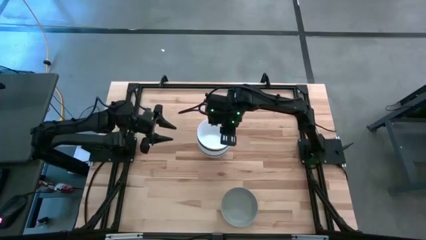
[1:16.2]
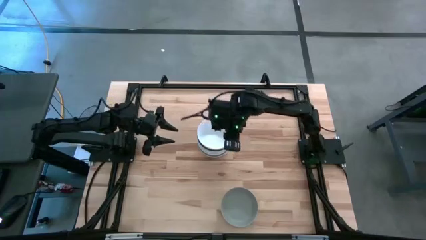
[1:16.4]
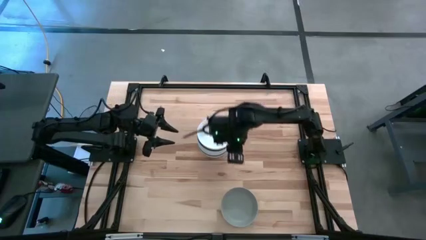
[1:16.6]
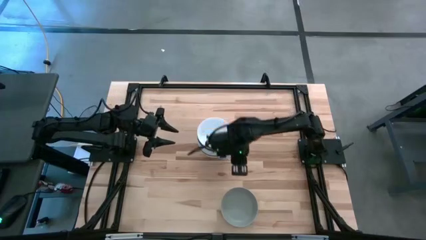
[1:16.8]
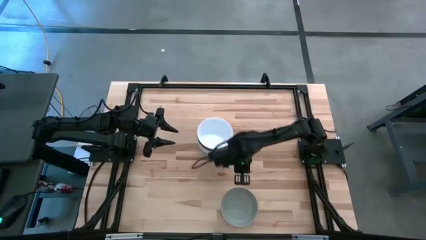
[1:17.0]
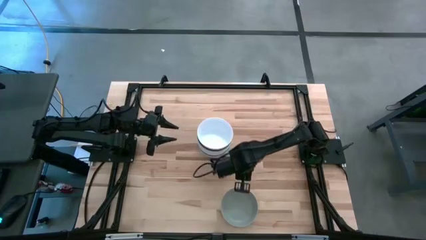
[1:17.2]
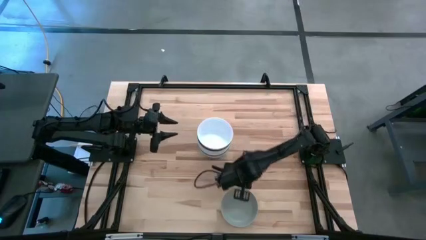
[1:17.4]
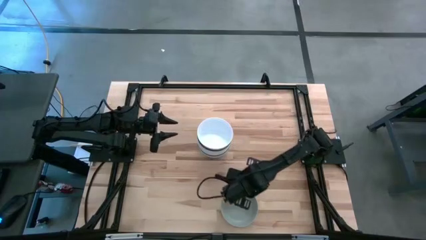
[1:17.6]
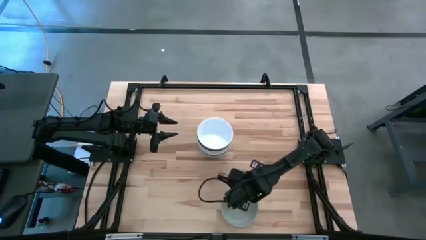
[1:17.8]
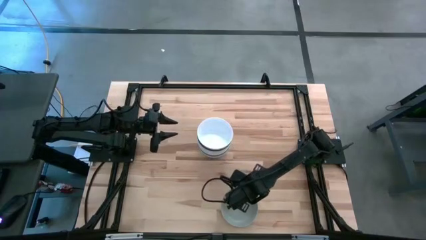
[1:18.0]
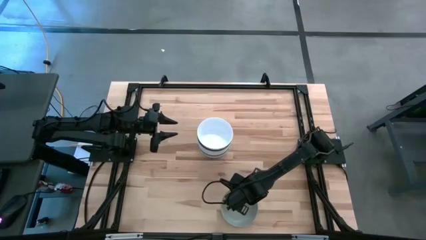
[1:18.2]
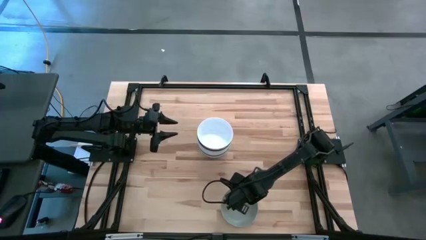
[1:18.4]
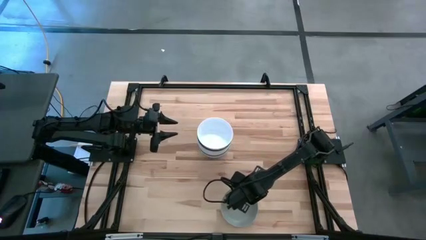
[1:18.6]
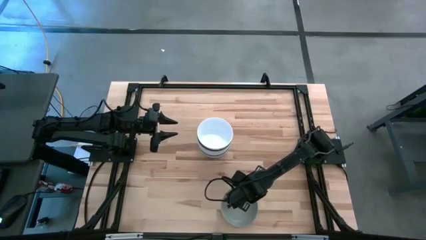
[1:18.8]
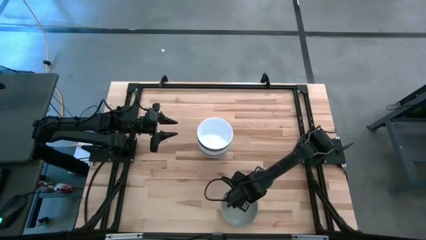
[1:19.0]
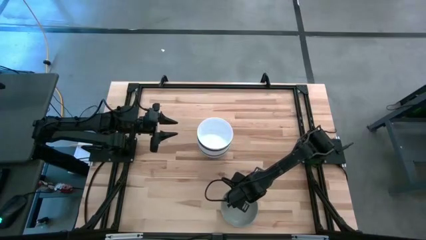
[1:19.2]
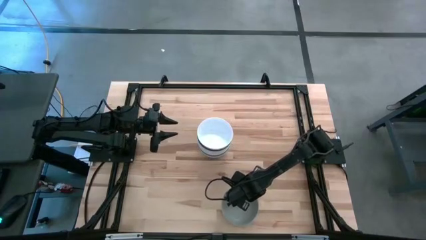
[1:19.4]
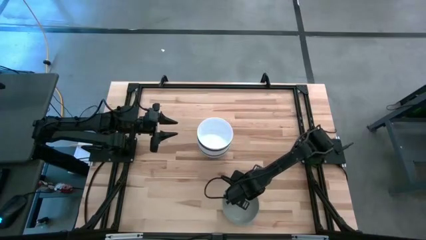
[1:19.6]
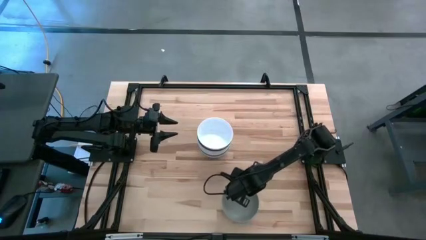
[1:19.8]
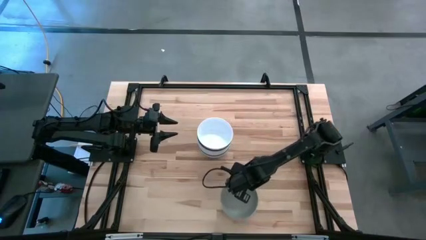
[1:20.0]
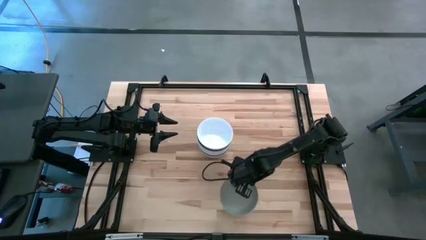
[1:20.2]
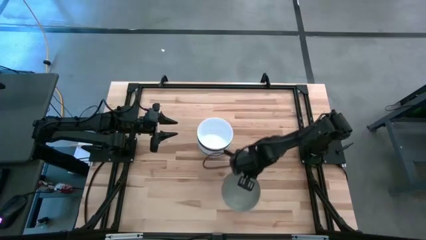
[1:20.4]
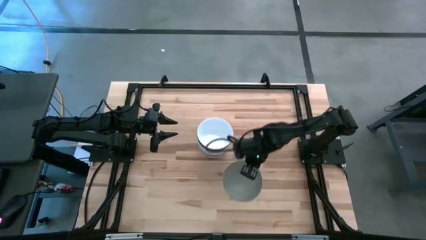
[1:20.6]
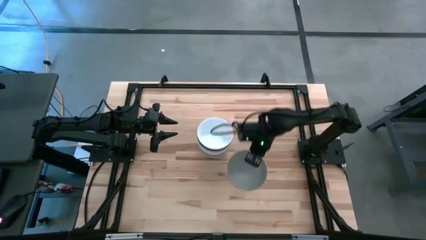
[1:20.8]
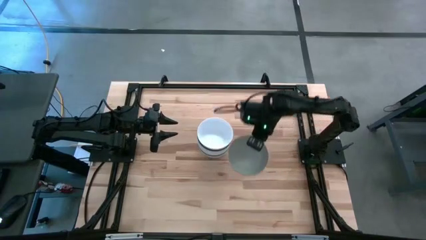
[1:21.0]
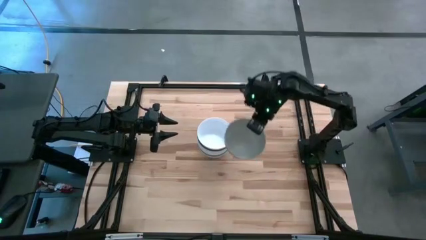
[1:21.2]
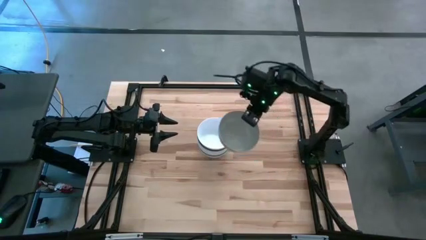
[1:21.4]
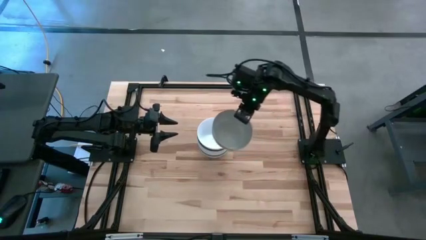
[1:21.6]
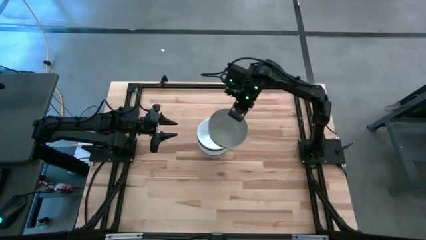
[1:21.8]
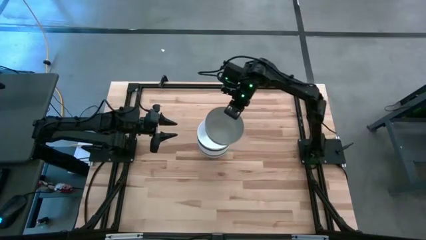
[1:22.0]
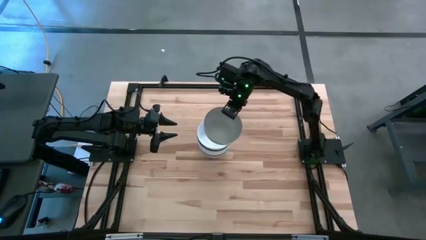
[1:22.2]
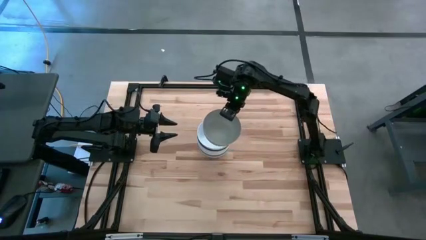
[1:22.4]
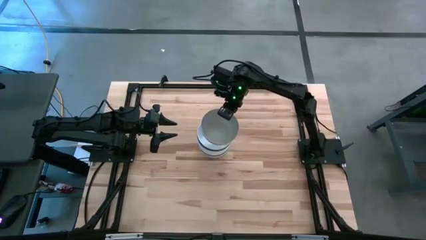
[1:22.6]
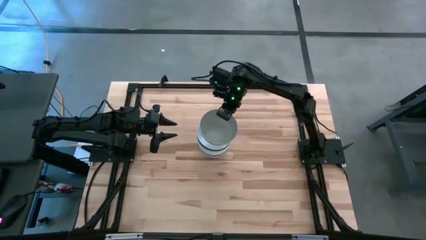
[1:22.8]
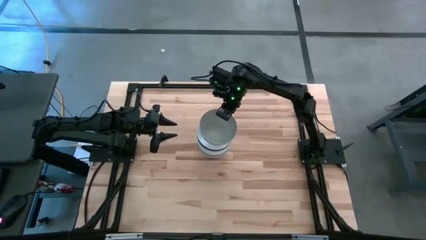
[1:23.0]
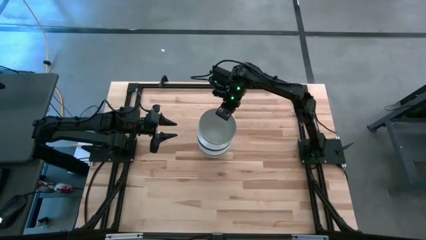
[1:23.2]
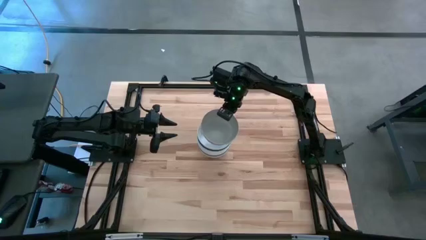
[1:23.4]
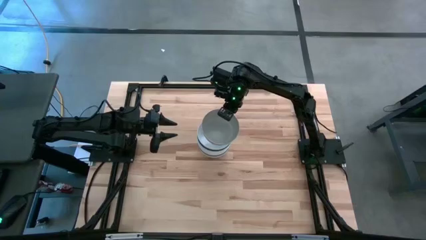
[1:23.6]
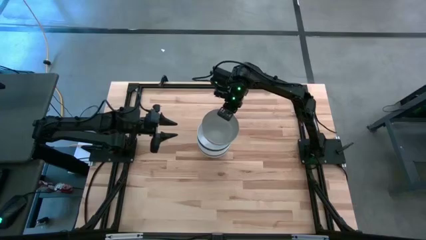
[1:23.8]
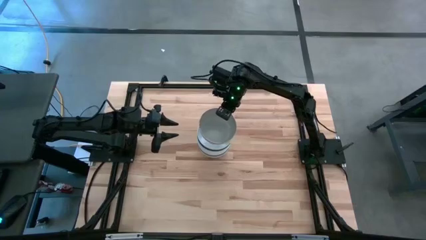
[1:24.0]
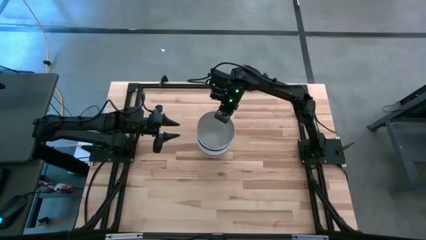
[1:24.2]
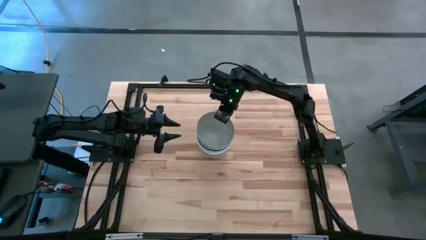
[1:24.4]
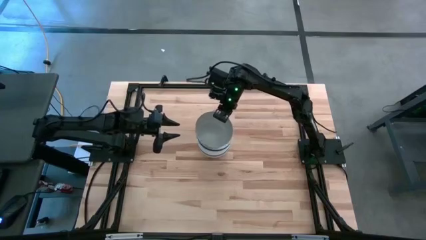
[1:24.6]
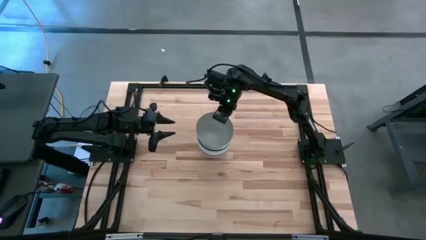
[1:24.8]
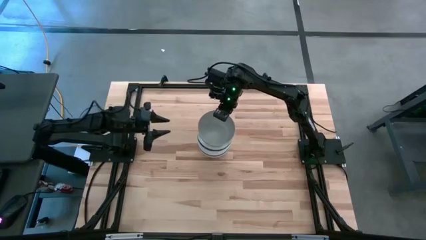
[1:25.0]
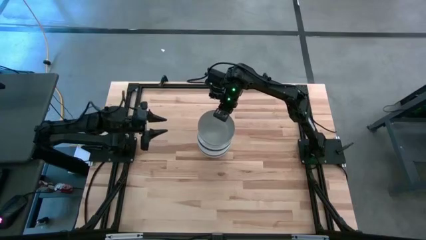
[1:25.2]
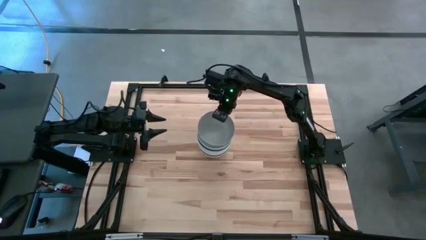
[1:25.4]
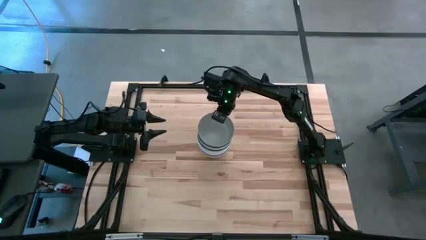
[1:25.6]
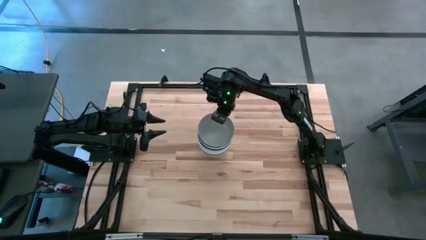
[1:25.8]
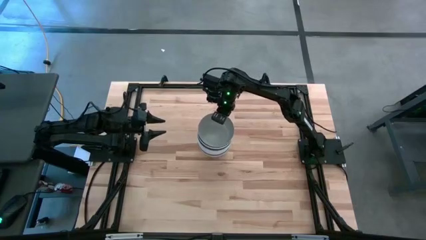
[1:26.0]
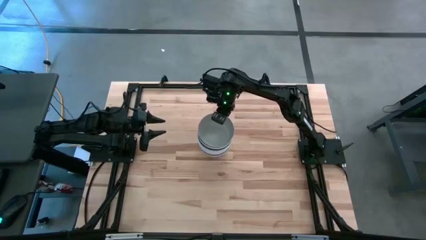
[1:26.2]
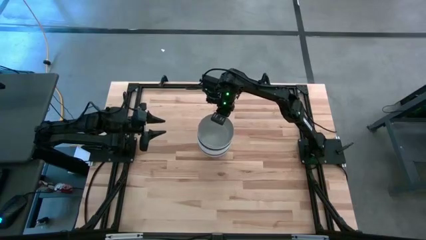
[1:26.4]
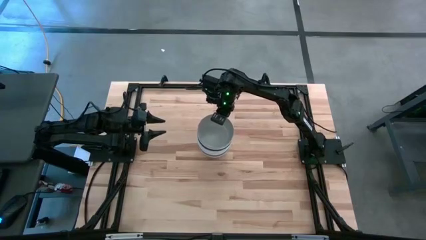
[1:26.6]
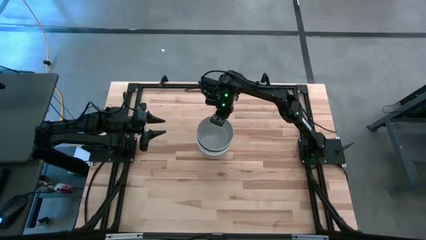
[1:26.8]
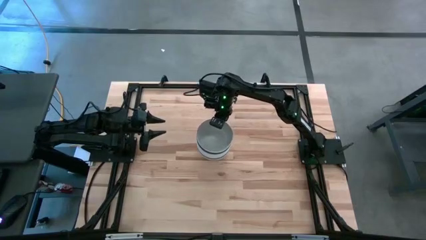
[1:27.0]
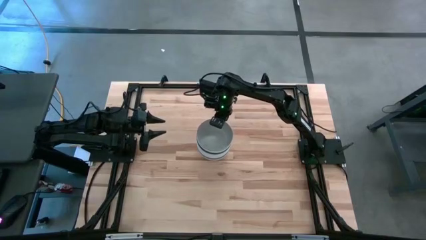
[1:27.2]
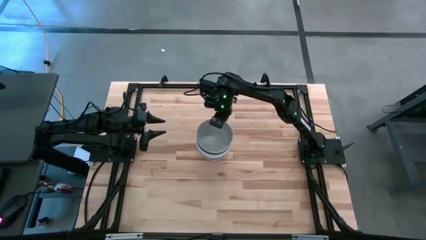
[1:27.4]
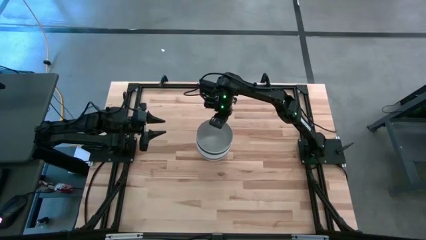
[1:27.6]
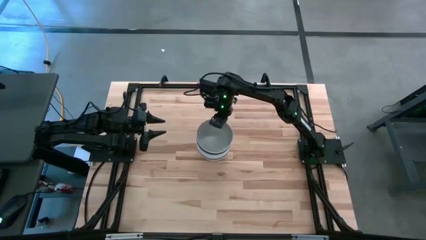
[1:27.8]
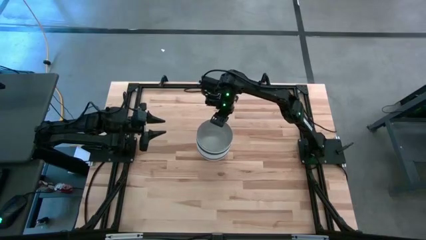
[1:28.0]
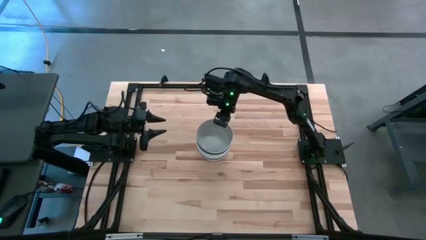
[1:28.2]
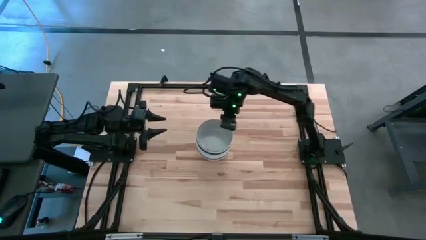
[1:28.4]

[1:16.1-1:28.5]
Task: Nest bowls inside each other
Stack the light gray bowl on top of the white bowl
